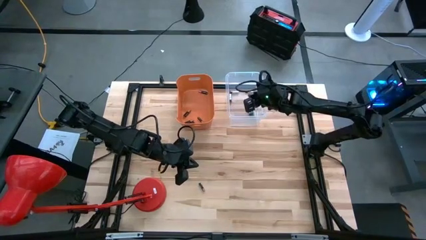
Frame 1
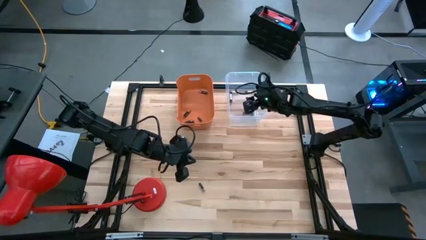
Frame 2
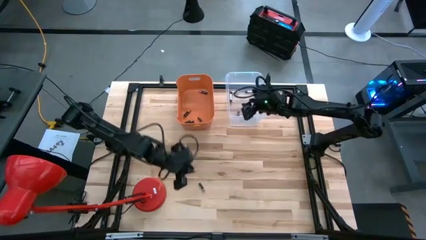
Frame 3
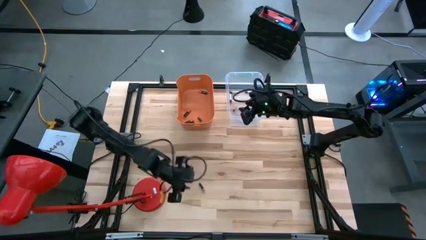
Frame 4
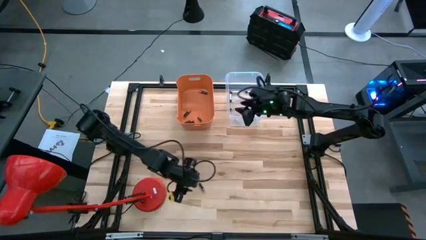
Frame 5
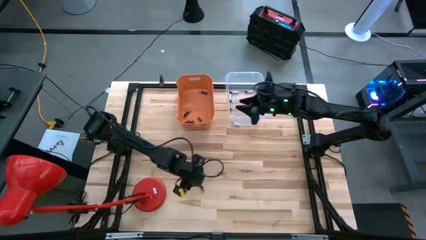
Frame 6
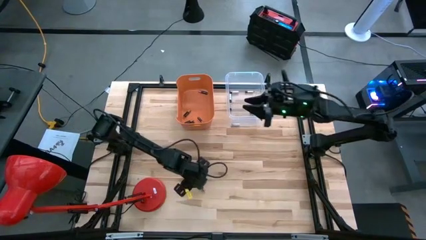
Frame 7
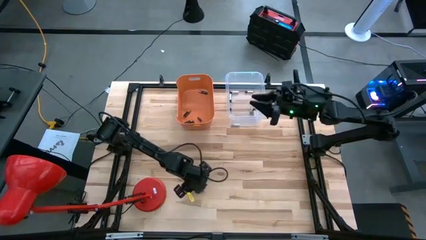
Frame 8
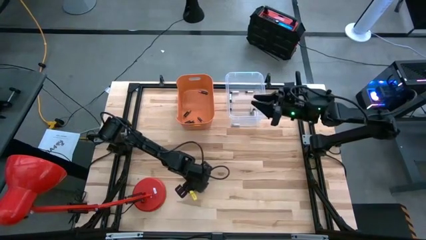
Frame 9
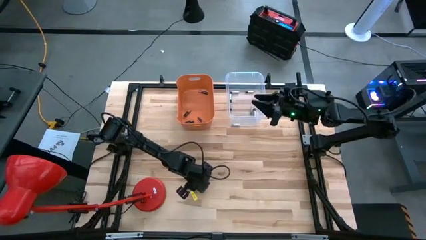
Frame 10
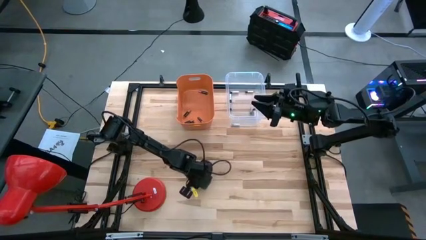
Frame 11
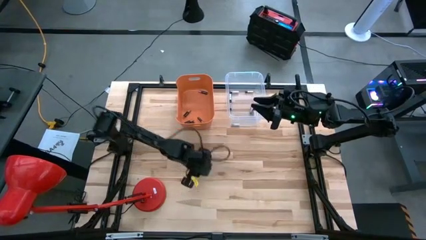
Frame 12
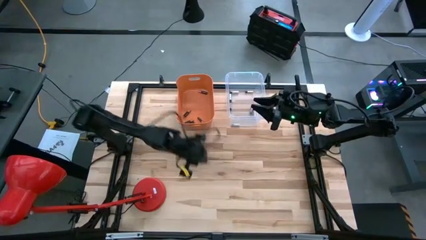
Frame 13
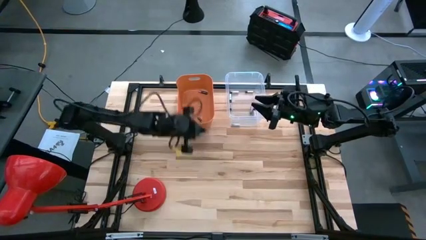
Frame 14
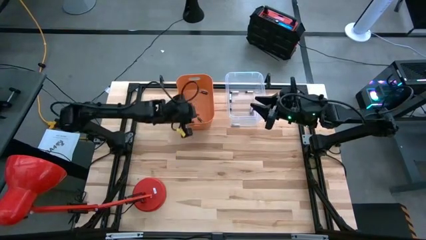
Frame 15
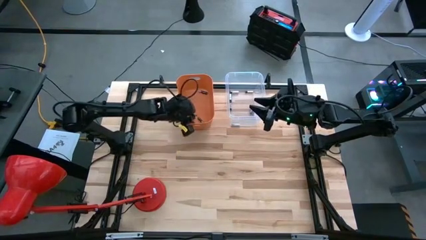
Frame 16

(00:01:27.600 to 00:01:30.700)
Task: Sort batteries
Put the brown battery into the orange bin

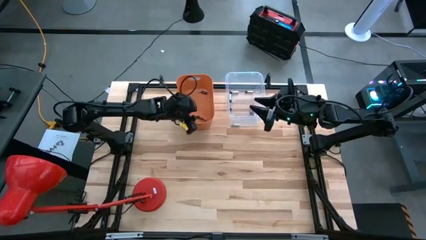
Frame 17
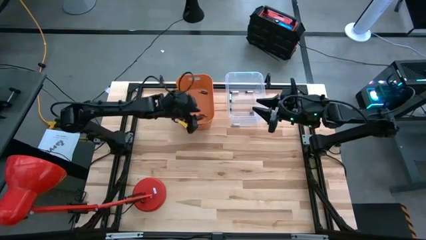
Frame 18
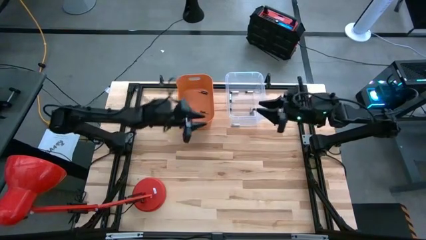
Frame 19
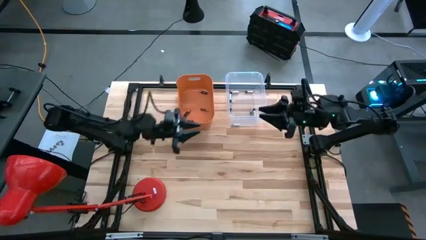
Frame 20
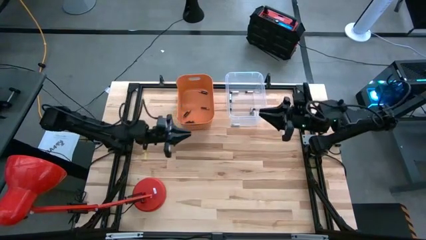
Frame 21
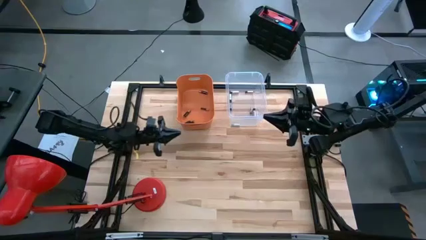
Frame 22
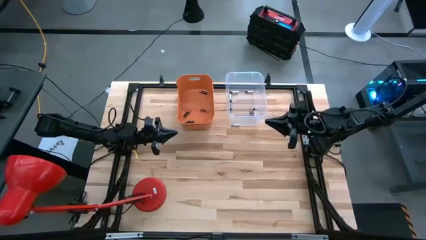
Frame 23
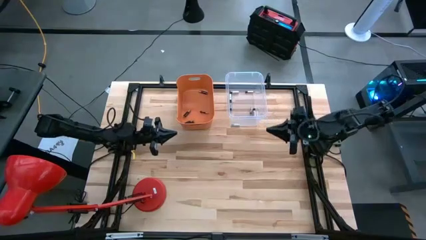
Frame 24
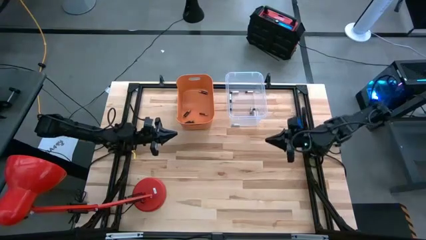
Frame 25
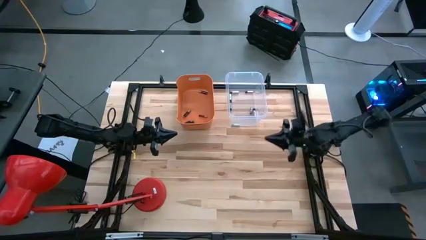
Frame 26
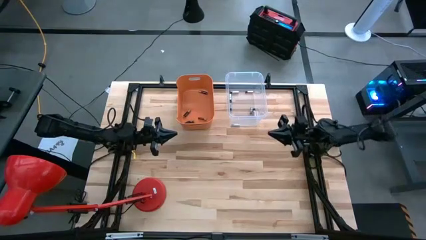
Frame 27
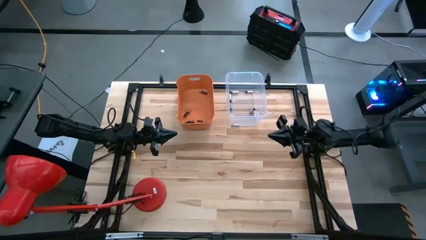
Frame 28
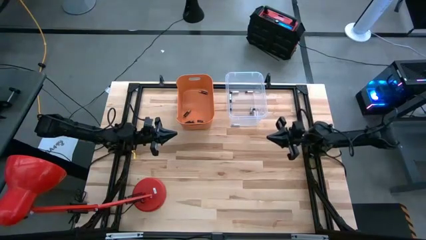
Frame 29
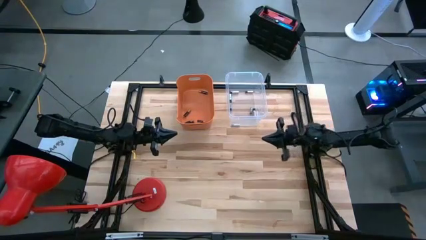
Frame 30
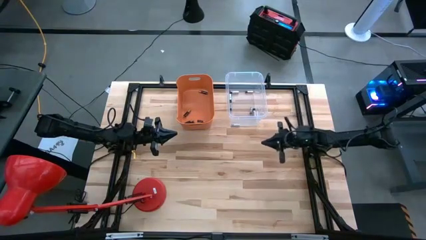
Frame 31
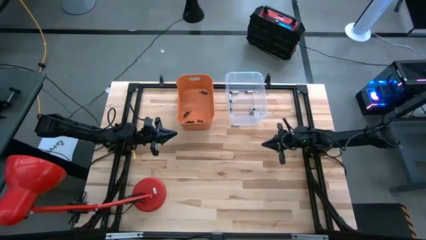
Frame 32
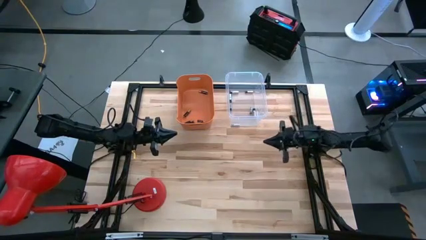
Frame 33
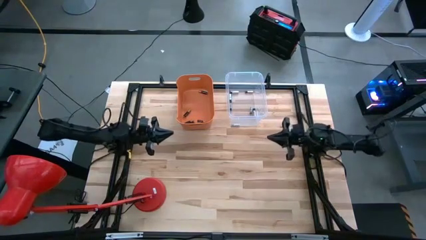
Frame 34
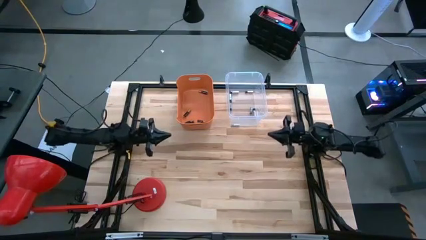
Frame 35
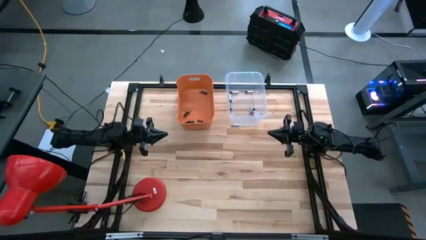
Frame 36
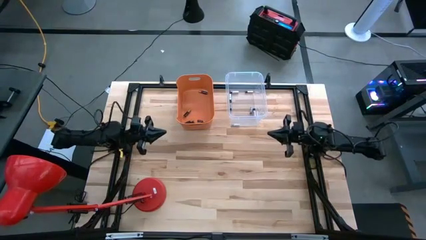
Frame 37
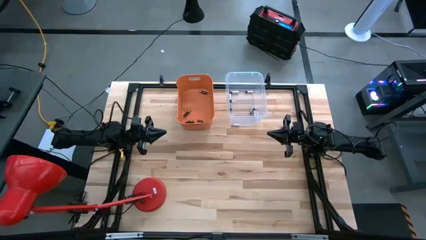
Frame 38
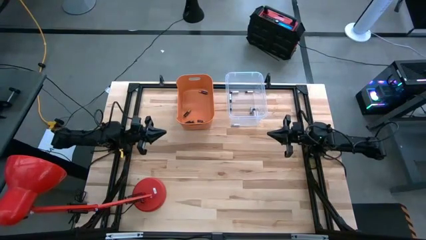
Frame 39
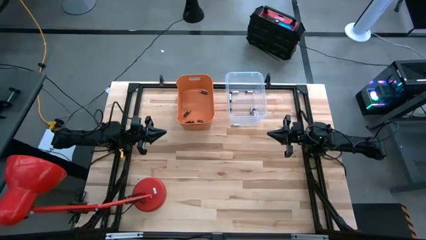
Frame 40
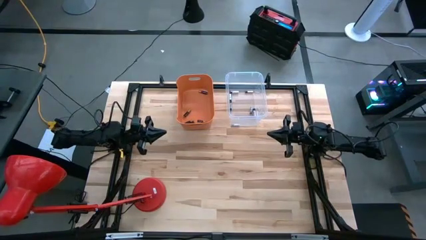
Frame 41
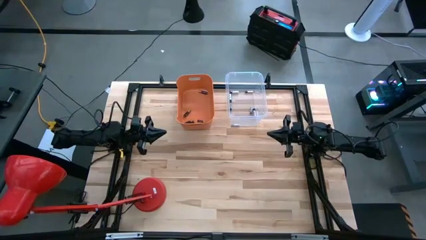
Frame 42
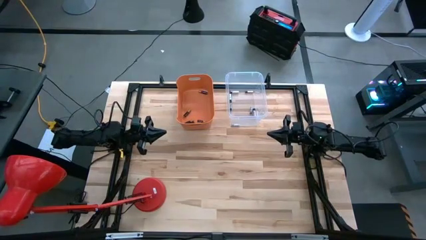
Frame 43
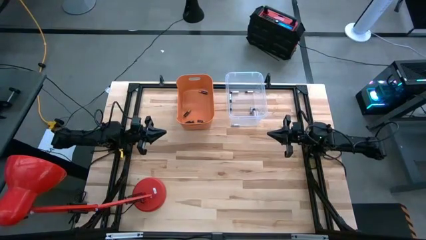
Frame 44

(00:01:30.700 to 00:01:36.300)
Return to Home Position
